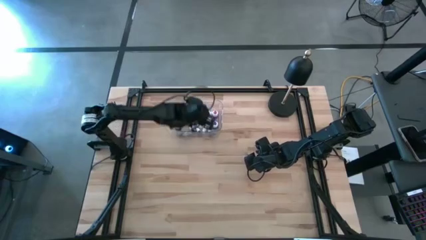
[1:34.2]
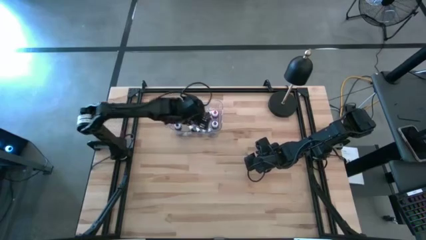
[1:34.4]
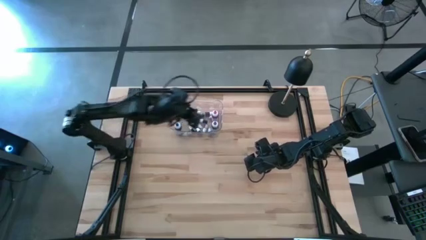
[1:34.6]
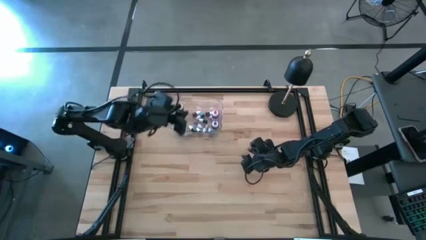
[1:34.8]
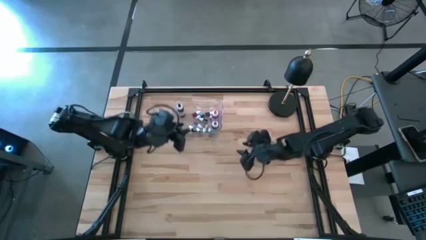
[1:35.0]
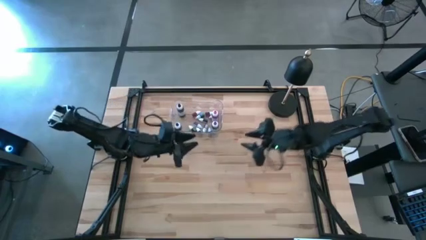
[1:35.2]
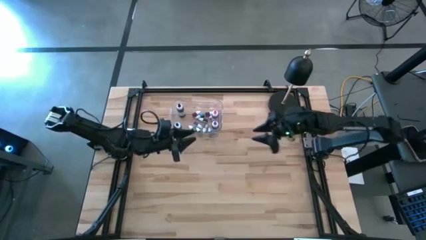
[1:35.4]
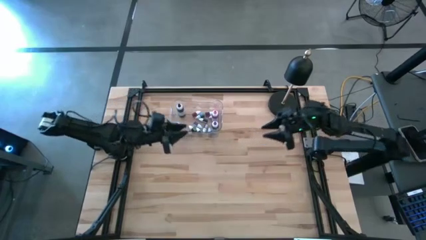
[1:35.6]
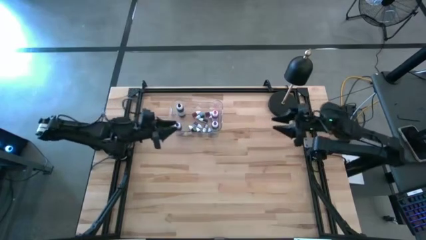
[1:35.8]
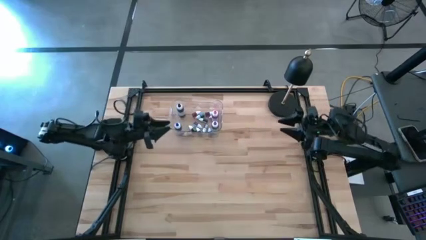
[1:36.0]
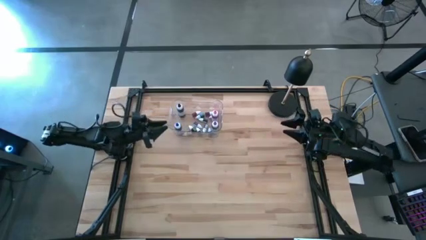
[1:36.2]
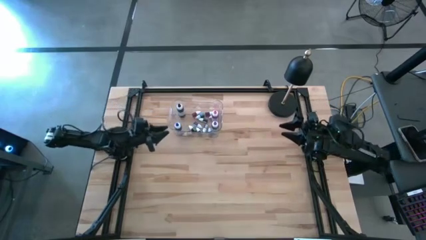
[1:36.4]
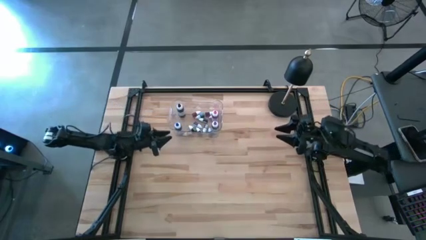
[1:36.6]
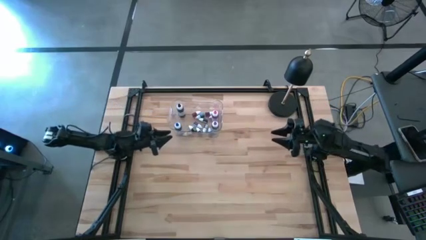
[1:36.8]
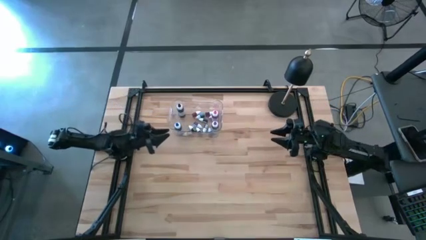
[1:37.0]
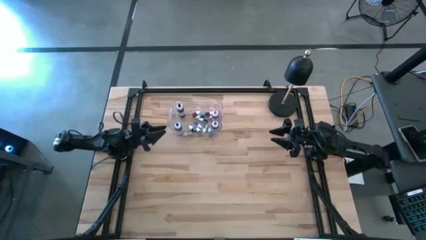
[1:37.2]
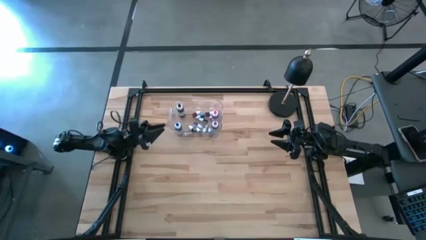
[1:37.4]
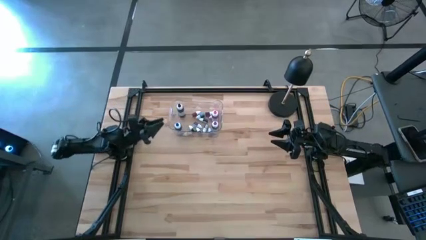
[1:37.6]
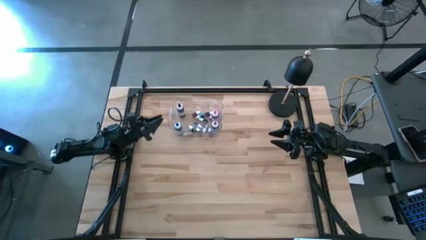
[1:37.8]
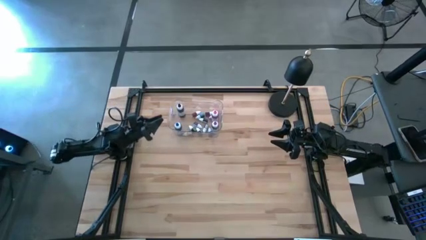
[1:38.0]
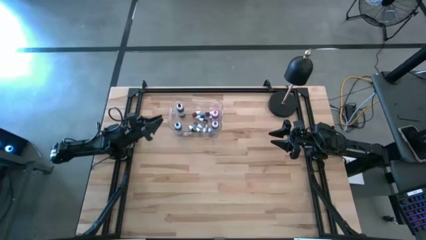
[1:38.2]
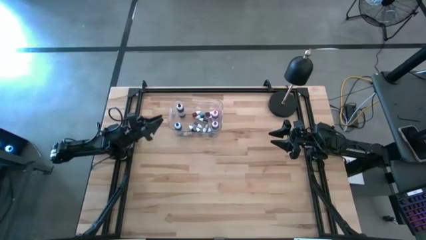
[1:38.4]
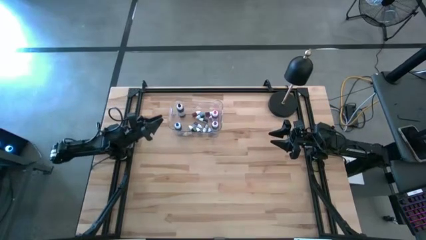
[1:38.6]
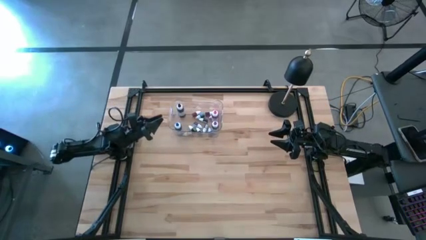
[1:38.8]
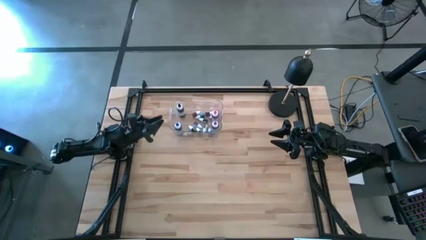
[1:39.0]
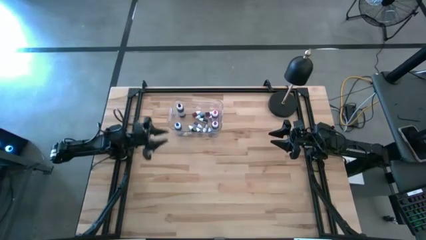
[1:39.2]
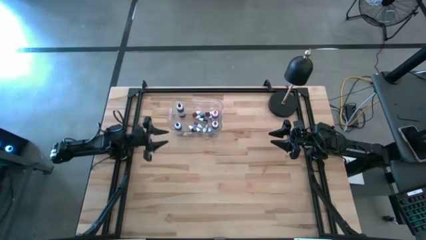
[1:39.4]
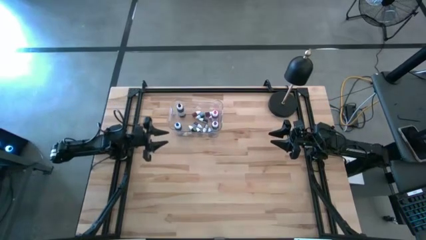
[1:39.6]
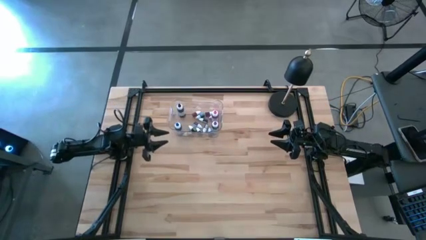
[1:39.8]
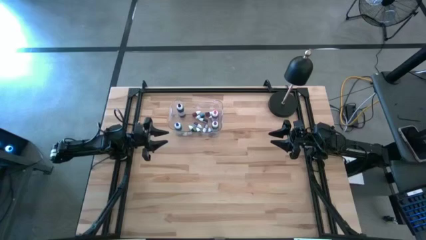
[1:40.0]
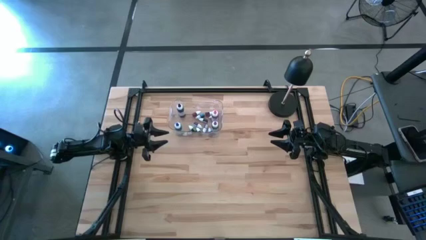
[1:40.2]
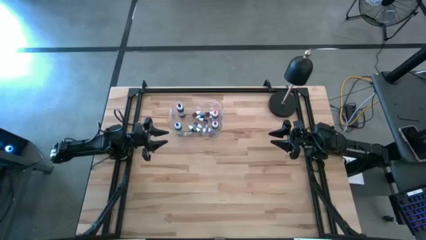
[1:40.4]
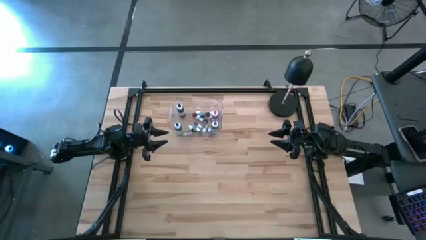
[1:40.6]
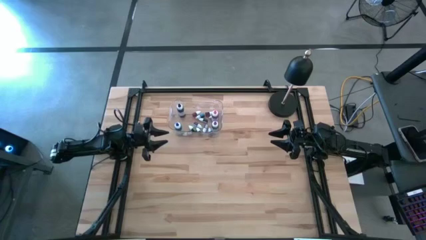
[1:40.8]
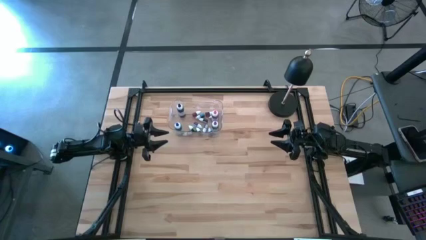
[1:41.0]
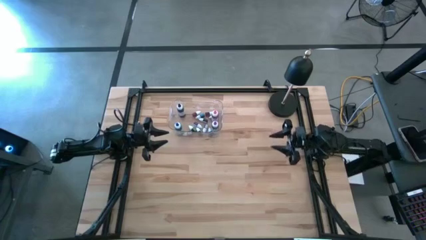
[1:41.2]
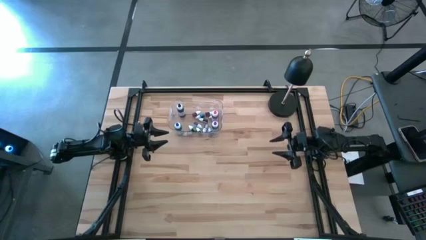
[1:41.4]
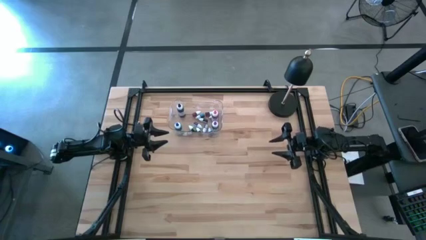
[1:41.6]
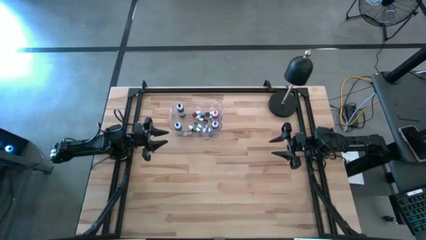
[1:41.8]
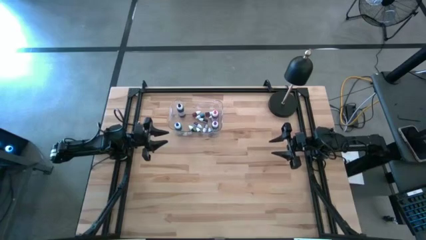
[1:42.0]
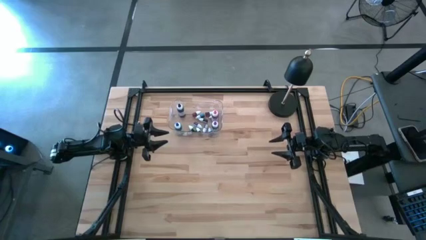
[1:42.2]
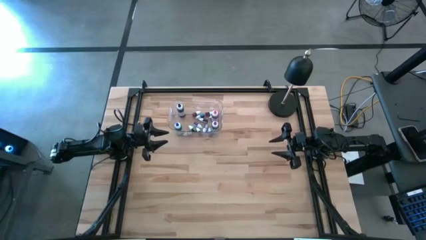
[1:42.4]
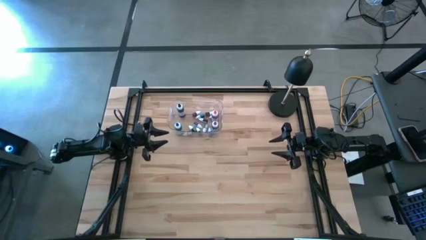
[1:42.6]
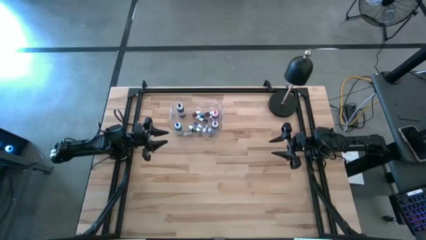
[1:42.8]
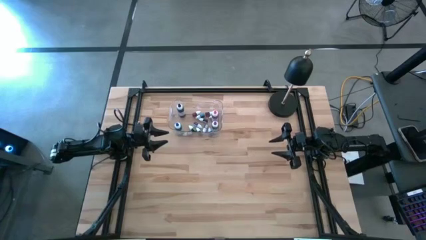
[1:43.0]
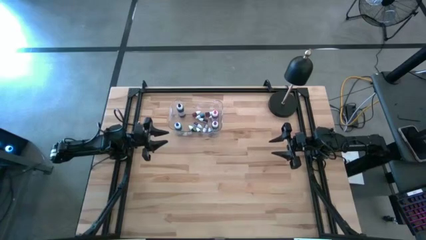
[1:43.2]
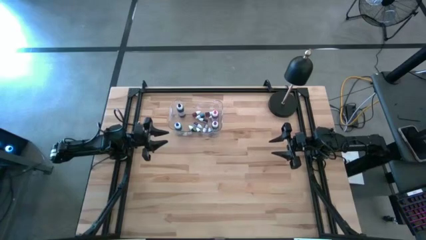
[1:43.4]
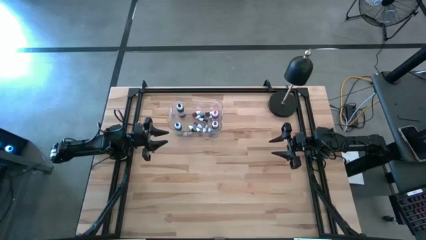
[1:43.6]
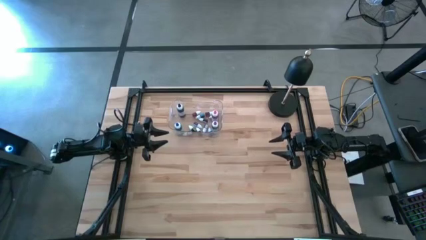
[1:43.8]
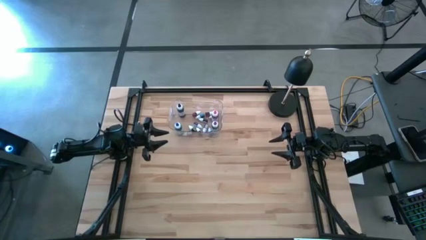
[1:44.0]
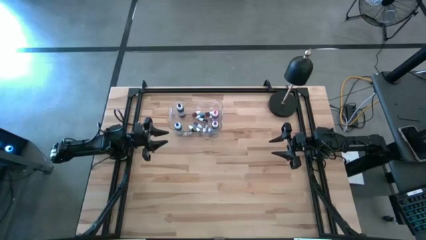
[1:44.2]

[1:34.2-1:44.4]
Task: Pick & Place food coloring
Return to Home Position

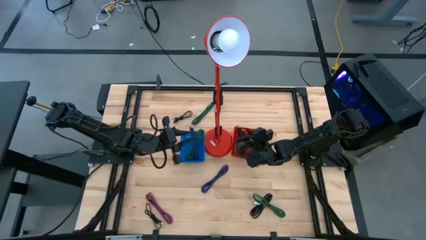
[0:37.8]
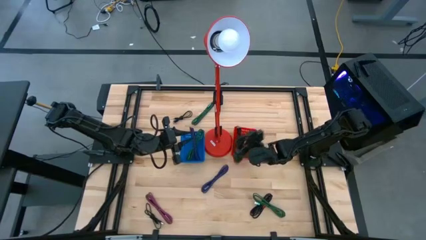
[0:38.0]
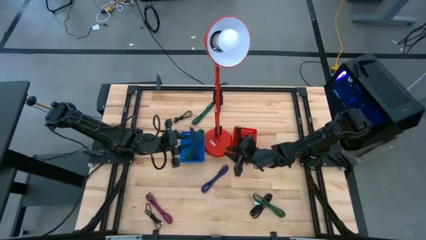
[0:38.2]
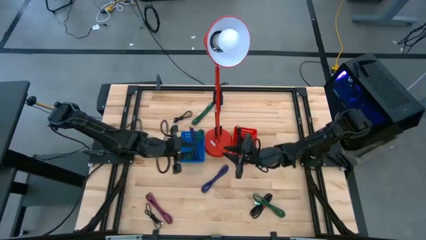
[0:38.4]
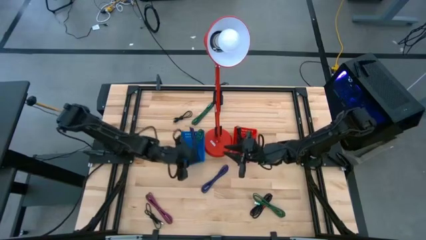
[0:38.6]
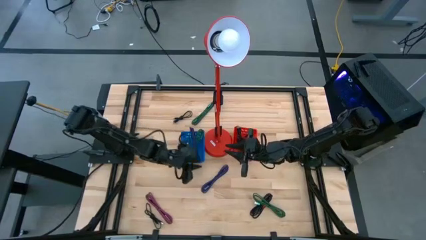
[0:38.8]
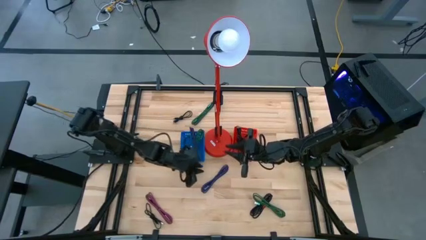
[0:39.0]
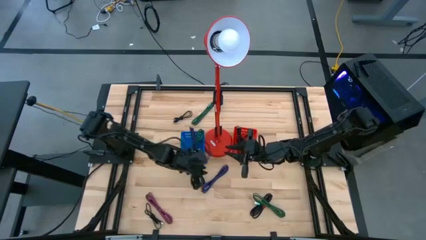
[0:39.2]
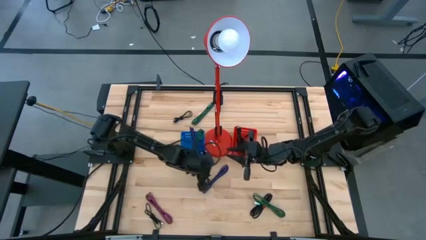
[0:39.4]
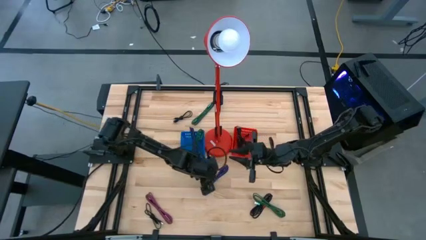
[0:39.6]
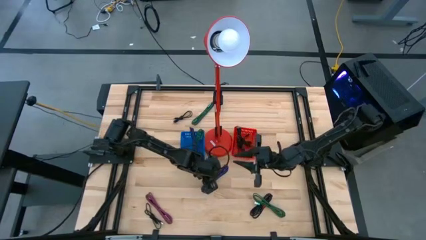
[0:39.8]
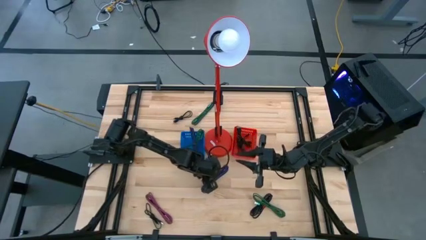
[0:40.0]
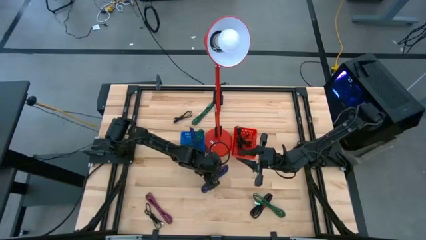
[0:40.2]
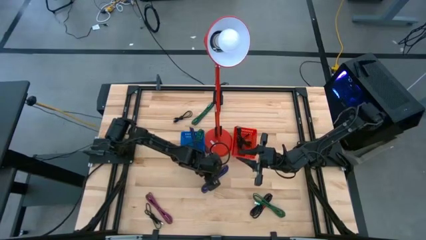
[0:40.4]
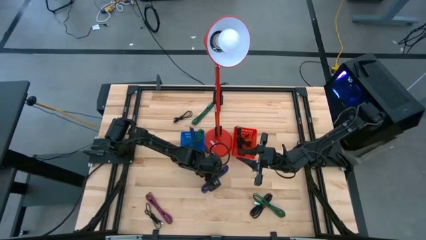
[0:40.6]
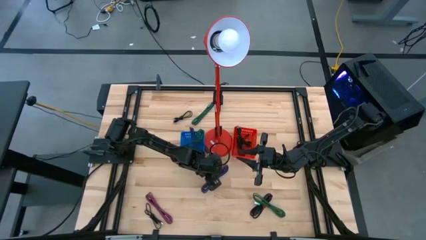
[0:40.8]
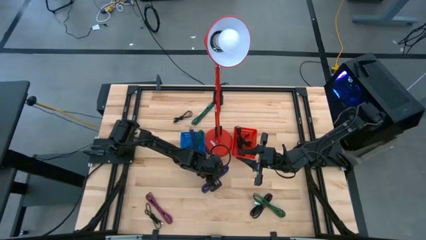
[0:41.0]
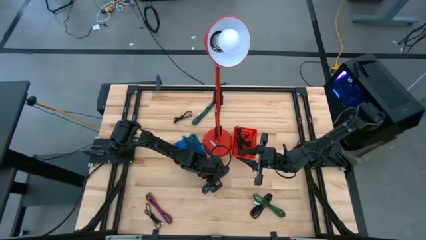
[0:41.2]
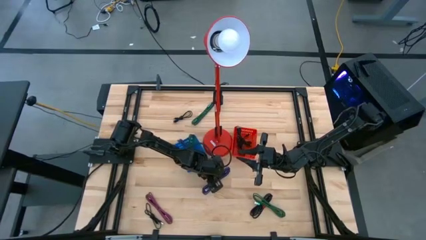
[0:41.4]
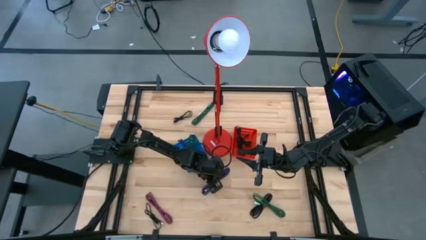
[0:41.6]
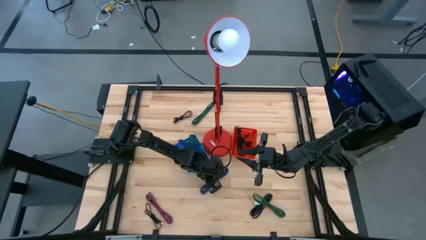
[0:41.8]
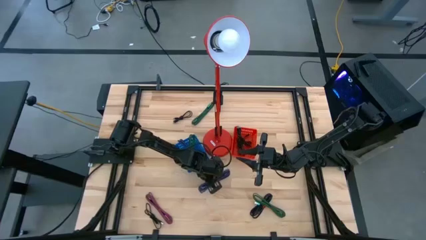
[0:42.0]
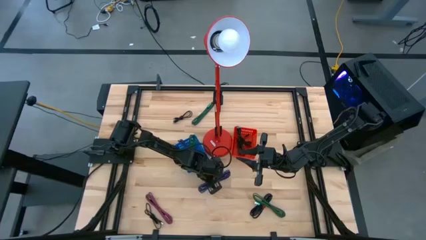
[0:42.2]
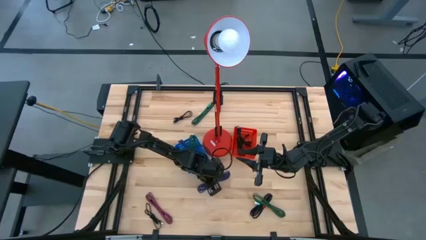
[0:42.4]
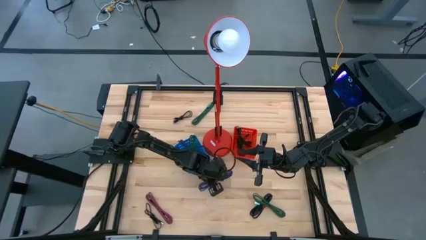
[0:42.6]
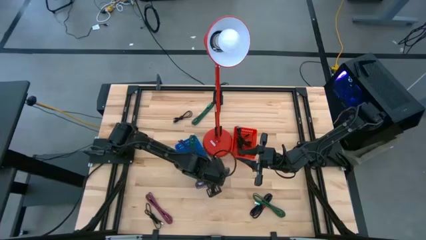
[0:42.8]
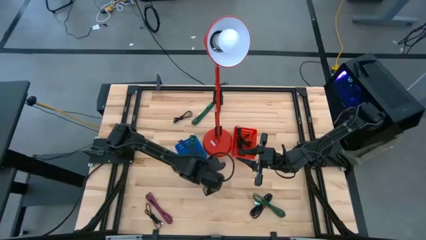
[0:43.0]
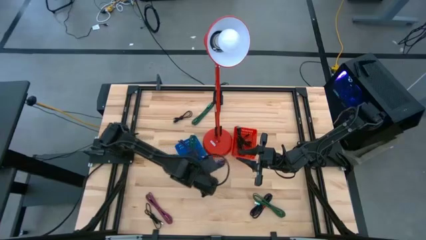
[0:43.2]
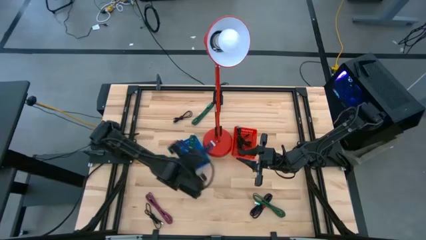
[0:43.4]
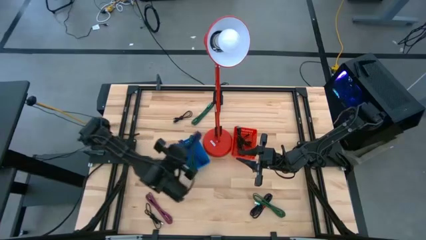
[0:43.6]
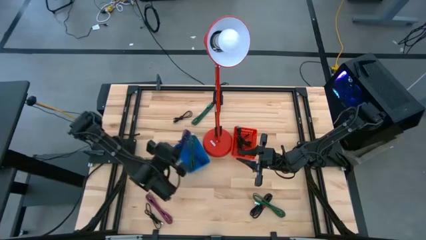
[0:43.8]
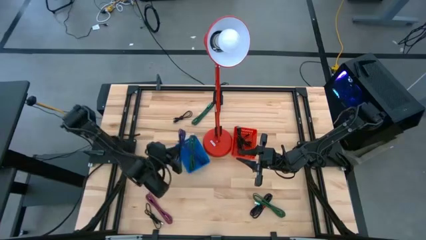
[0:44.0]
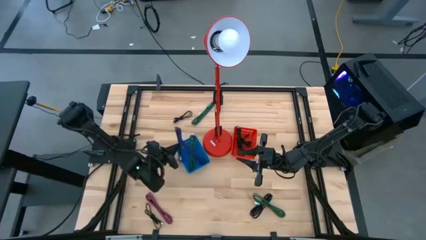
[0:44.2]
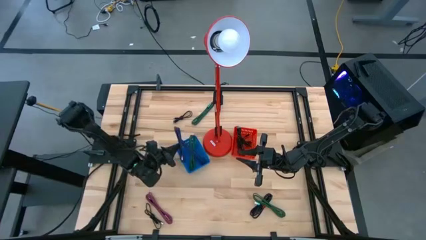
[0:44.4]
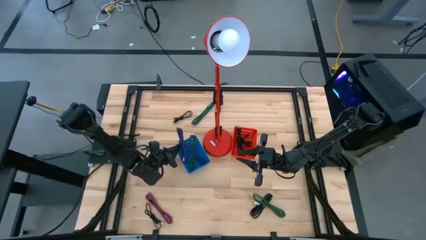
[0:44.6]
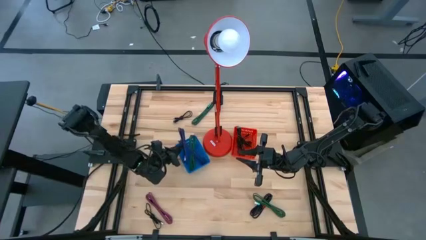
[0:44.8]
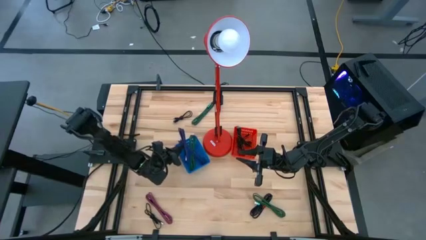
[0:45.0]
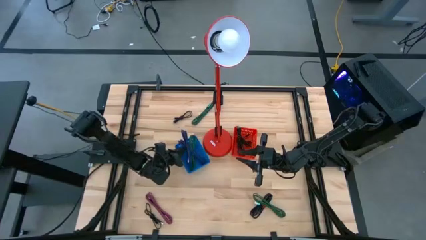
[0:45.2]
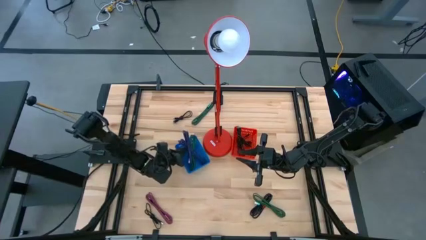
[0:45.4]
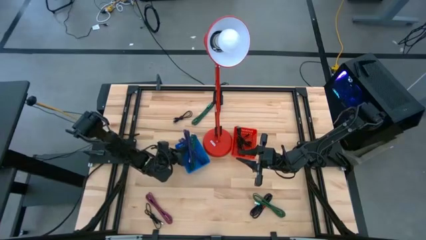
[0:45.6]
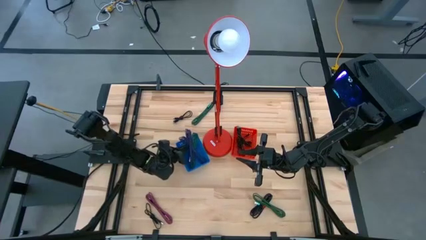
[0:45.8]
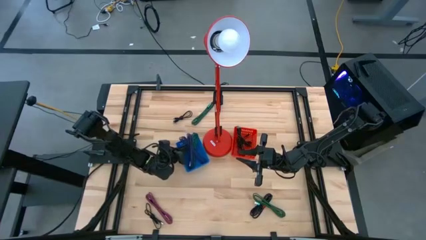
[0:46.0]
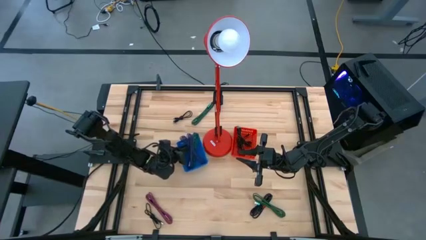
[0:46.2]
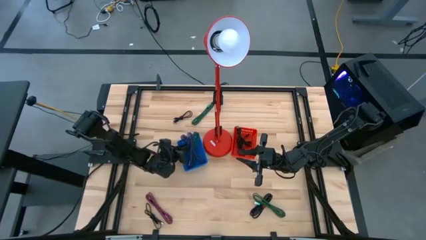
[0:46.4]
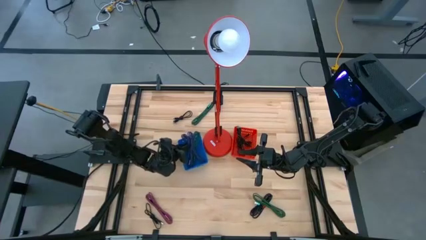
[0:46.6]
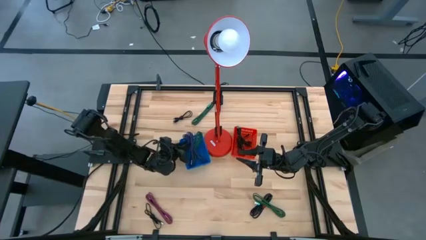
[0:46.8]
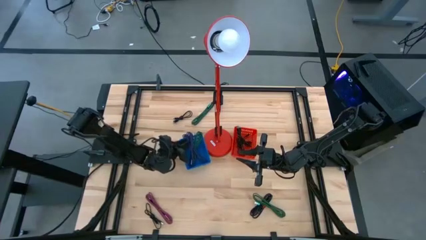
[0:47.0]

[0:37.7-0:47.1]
Task: Pick & Place USB Port
Put the blue charger cable into the blue bin
